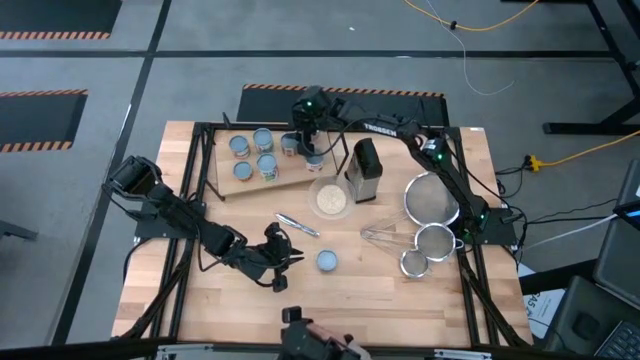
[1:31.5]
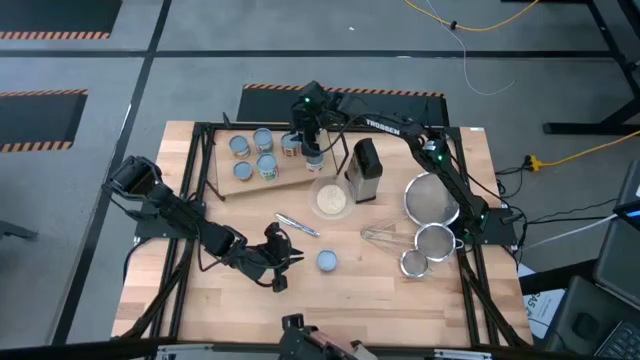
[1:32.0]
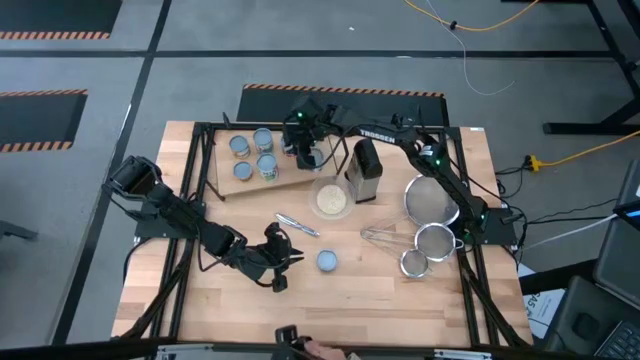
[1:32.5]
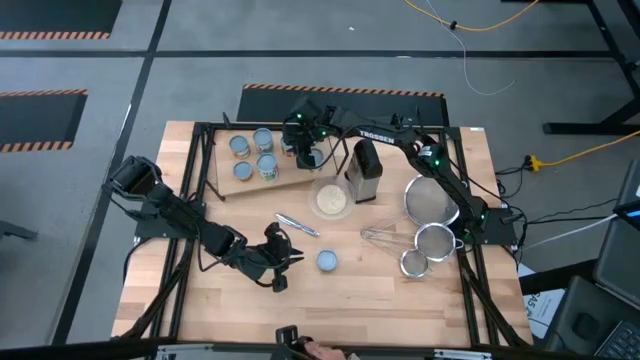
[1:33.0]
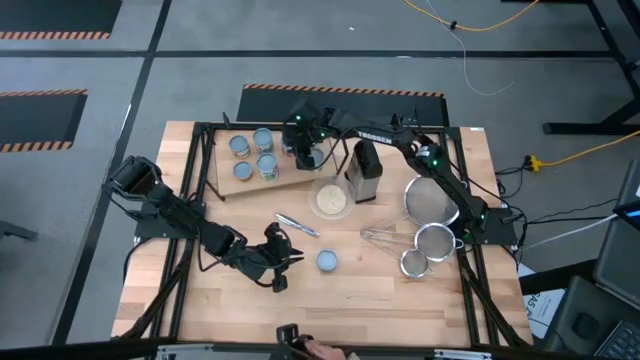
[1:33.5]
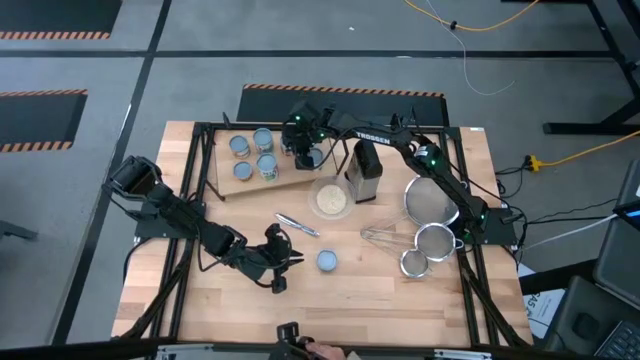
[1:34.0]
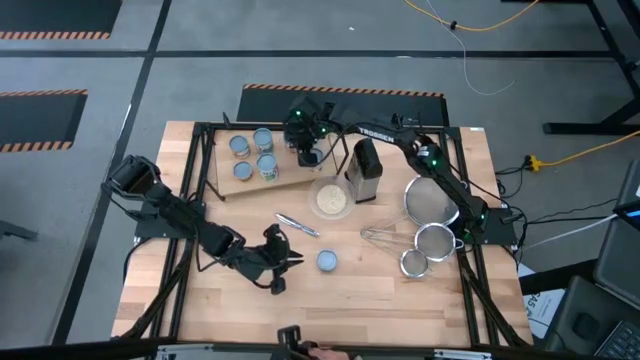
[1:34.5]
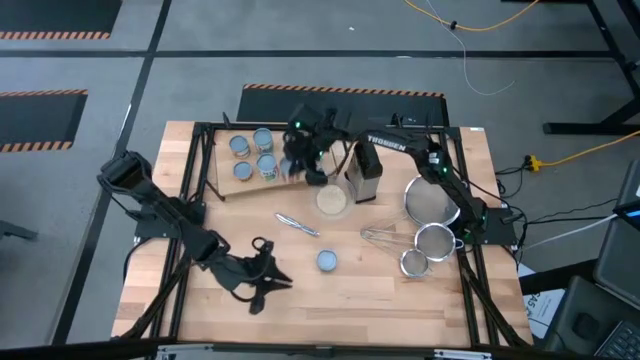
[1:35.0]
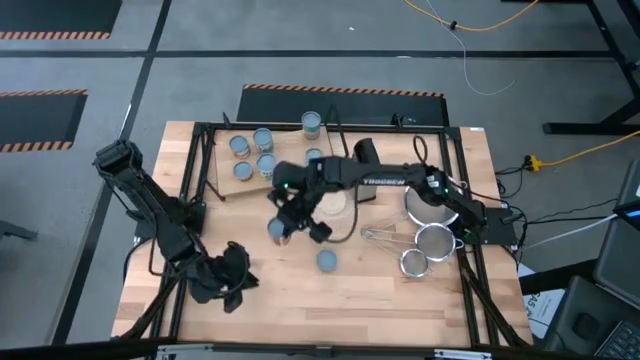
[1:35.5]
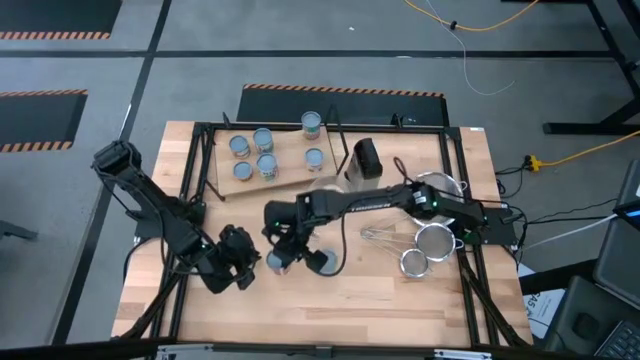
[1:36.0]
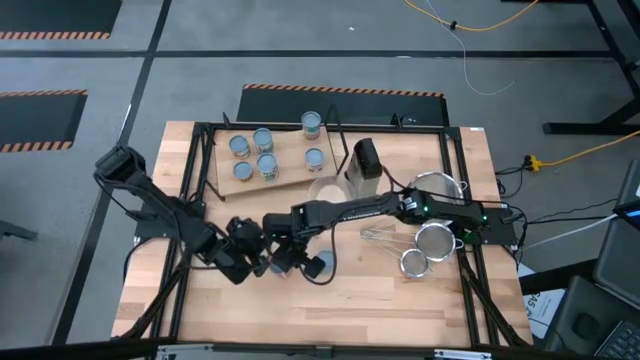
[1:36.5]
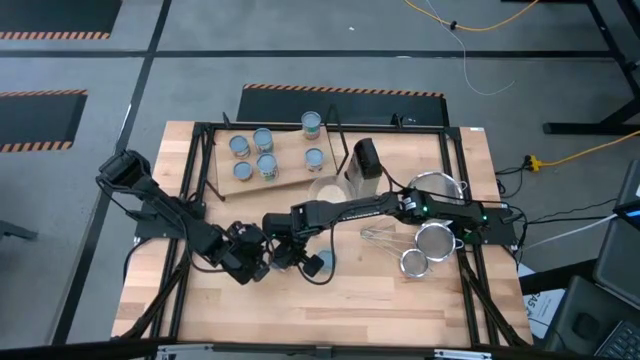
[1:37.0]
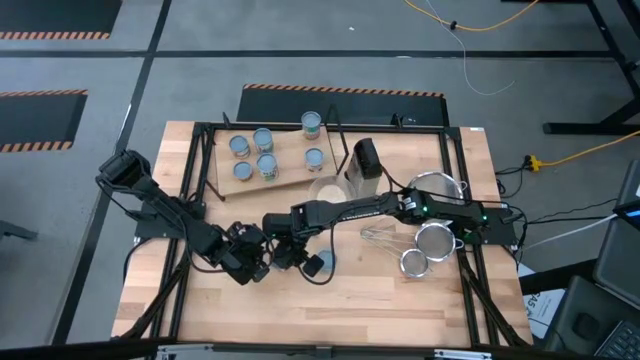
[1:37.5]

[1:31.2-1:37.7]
Task: Pick and place cans onto a shelf
Remove the light red can from the shelf

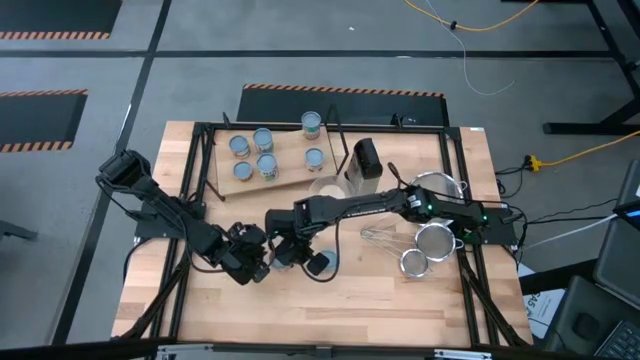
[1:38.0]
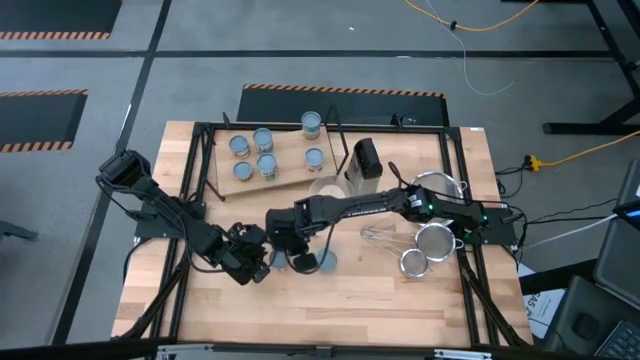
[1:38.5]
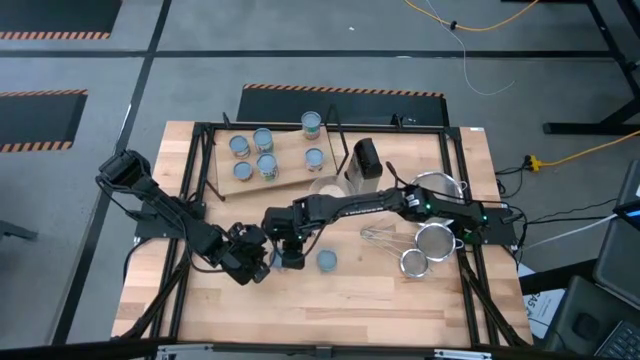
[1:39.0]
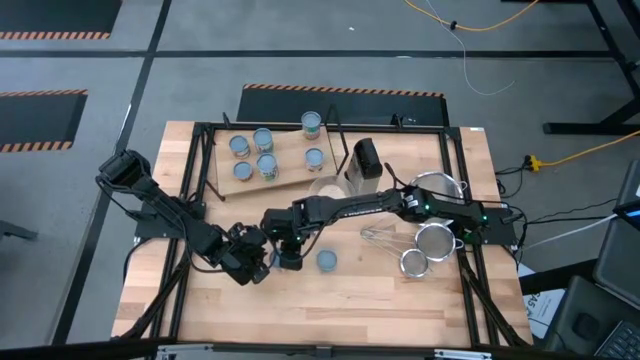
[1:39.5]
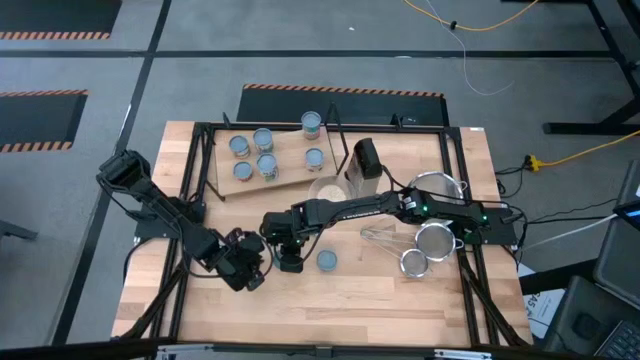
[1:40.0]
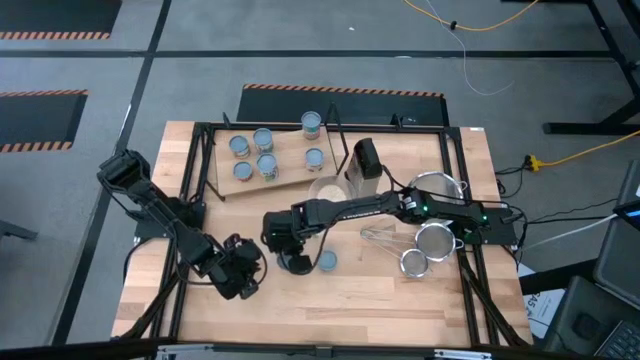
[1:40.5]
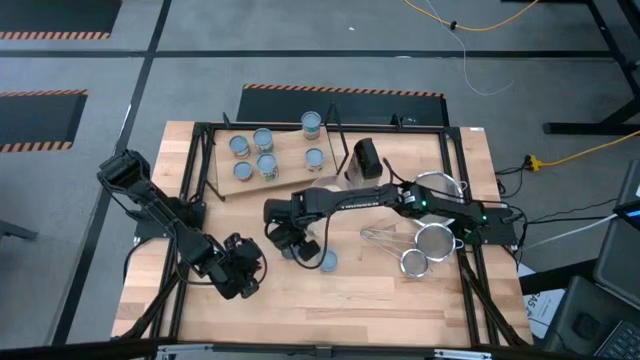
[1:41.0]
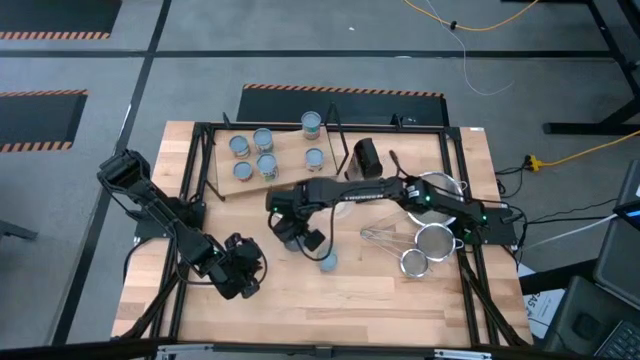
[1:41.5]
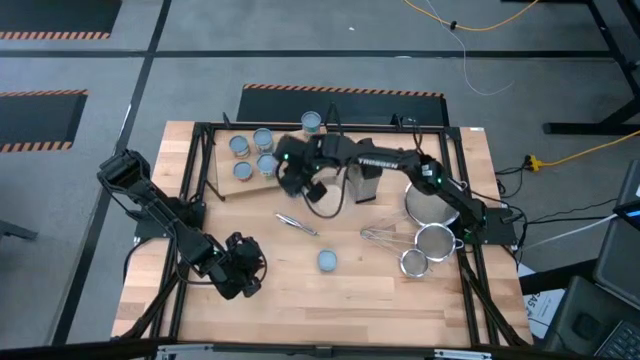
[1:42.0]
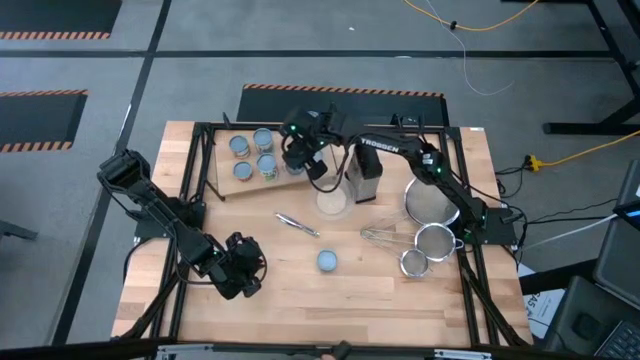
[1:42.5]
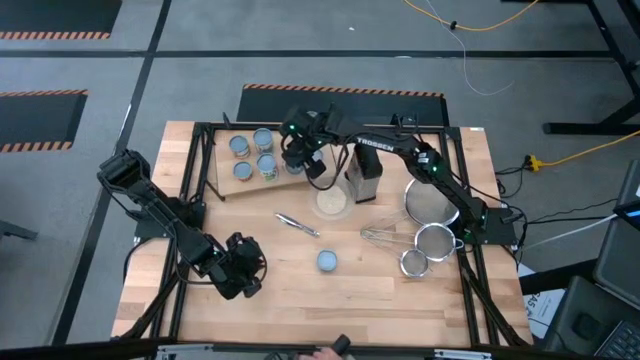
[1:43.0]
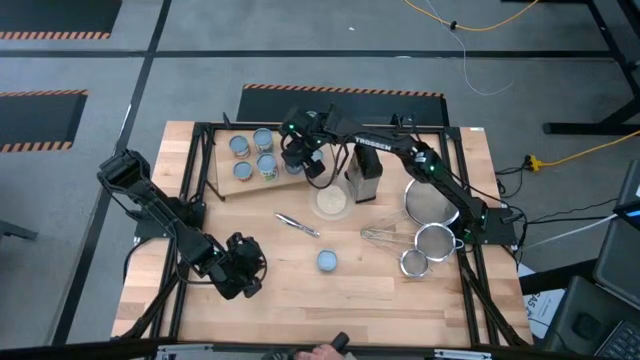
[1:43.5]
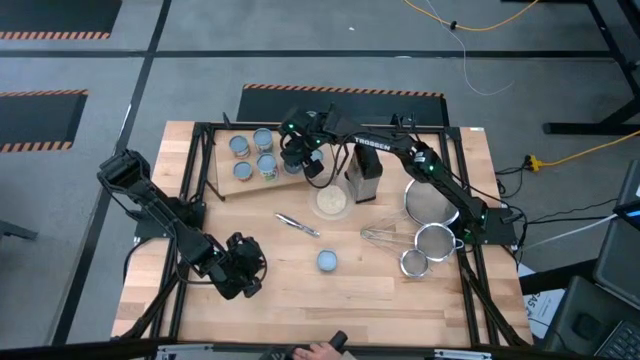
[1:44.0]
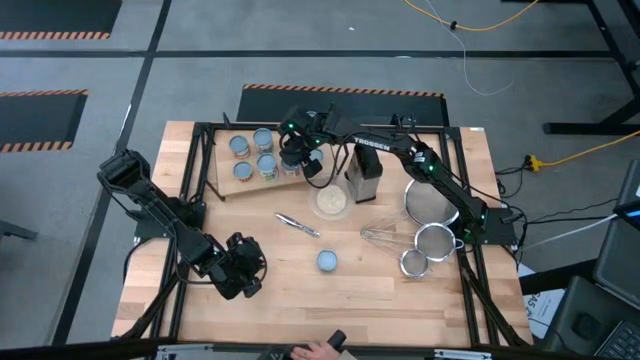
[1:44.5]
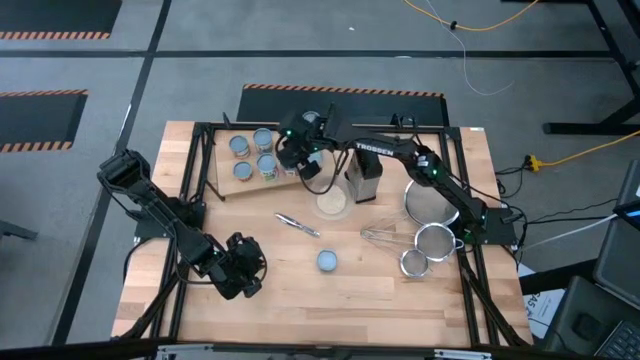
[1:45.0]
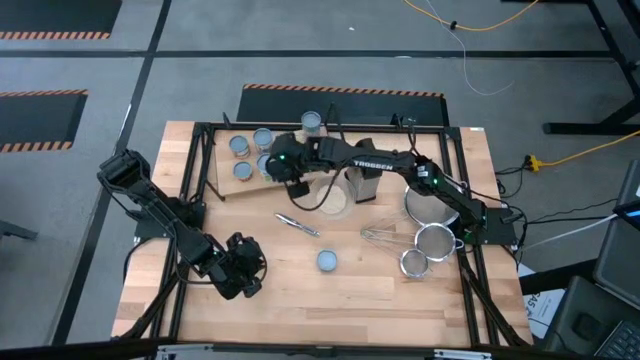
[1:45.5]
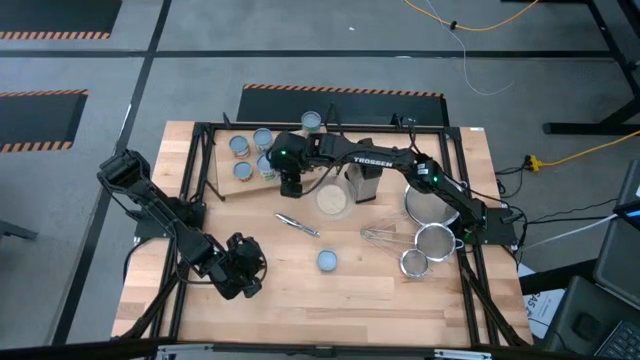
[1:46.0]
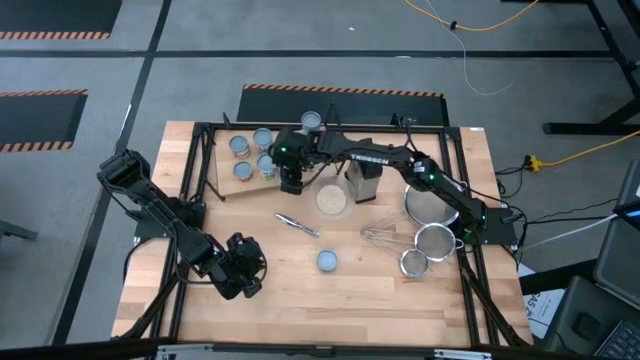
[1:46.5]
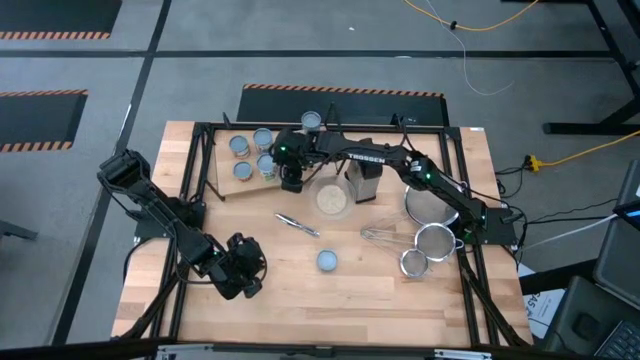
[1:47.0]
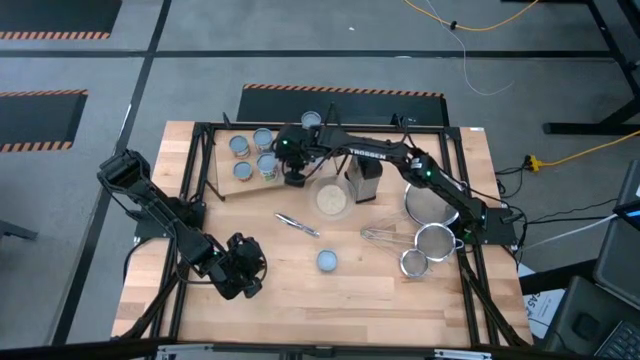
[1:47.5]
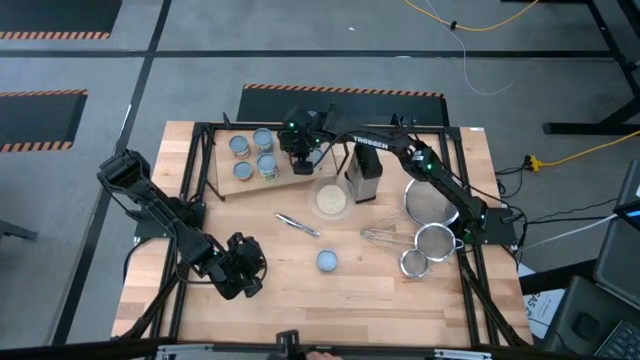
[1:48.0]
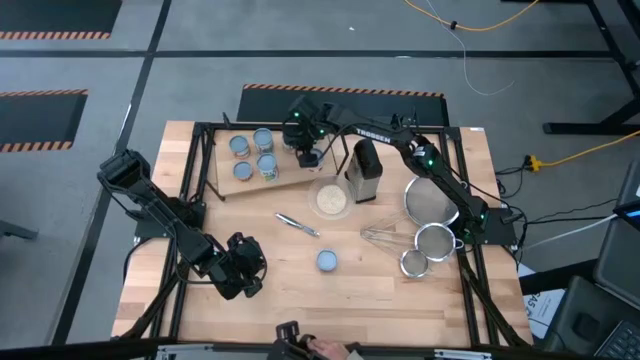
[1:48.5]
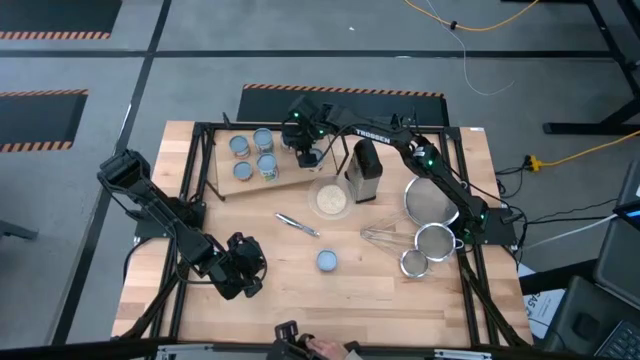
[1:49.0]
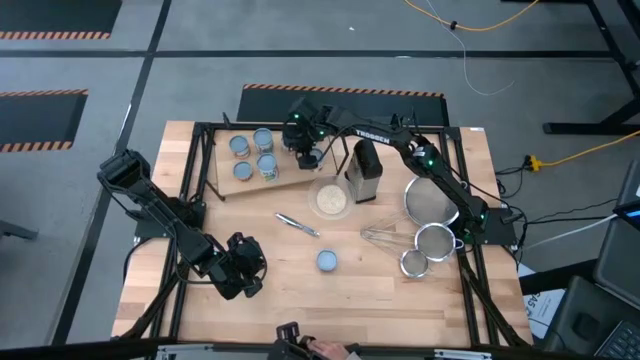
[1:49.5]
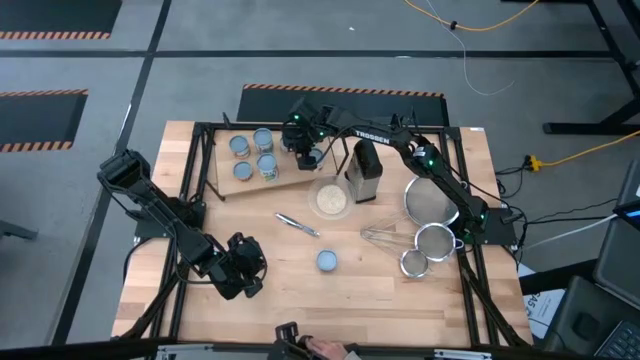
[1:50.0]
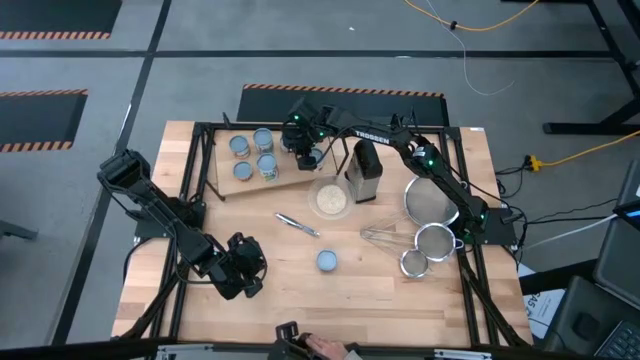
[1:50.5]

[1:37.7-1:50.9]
Put the light red can on the shelf
